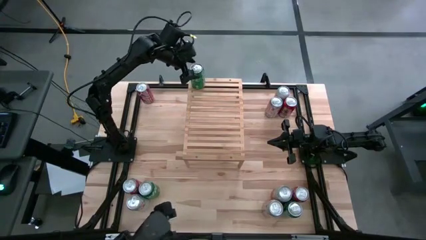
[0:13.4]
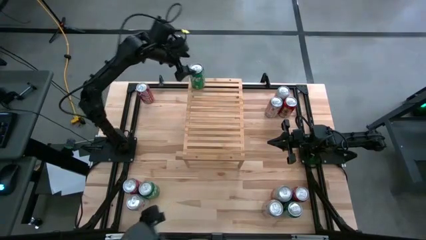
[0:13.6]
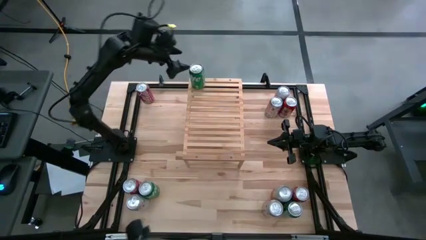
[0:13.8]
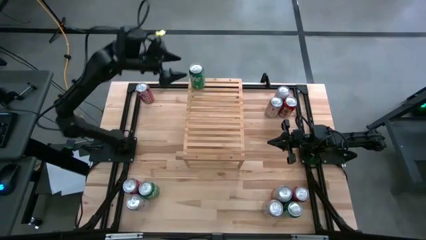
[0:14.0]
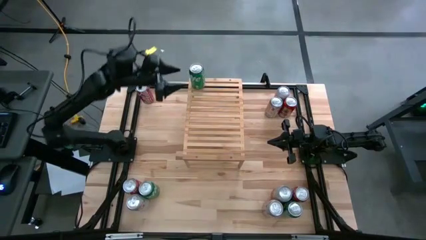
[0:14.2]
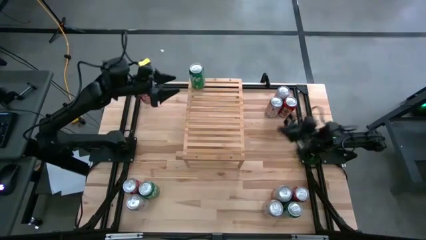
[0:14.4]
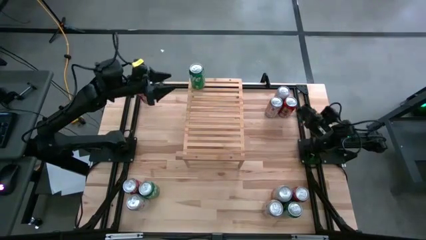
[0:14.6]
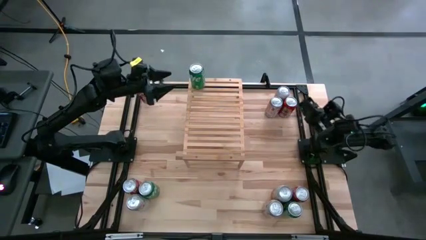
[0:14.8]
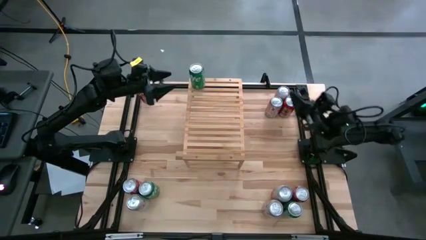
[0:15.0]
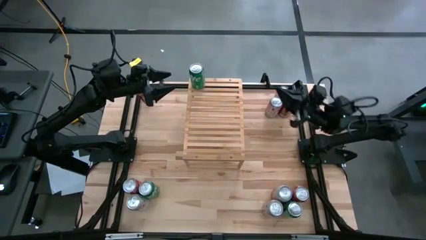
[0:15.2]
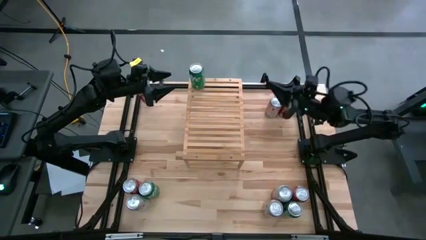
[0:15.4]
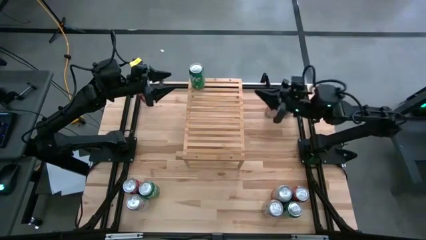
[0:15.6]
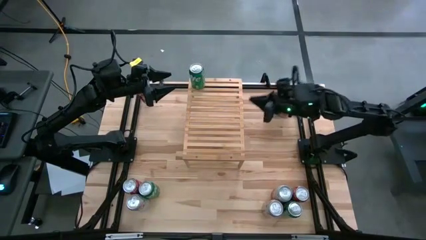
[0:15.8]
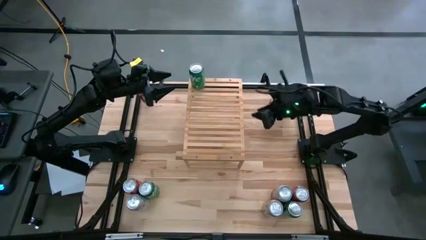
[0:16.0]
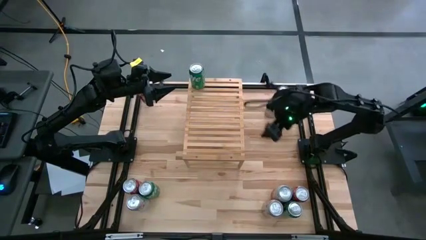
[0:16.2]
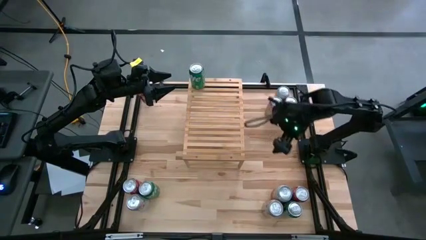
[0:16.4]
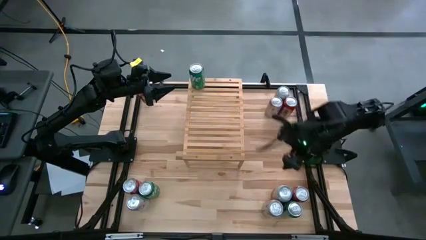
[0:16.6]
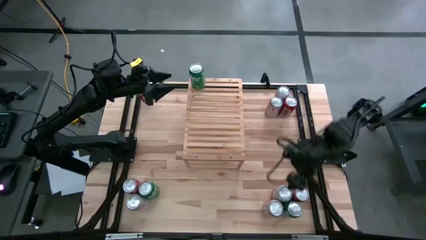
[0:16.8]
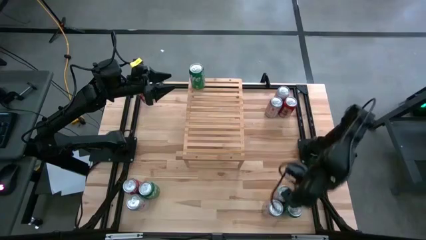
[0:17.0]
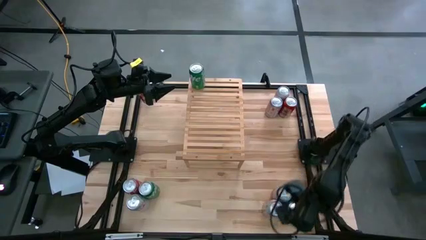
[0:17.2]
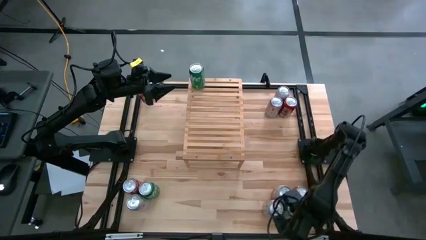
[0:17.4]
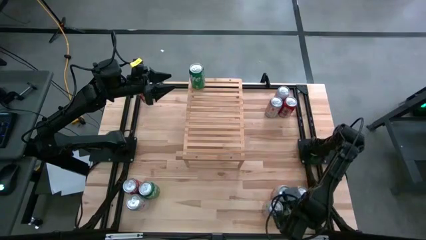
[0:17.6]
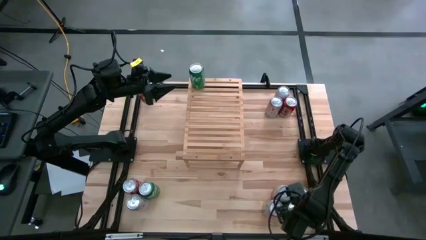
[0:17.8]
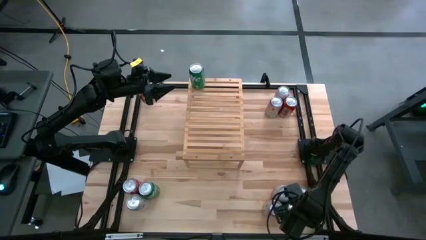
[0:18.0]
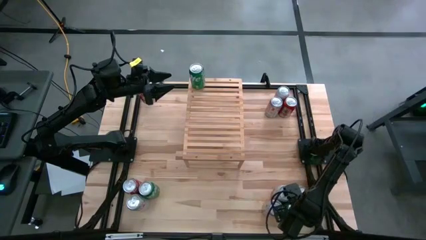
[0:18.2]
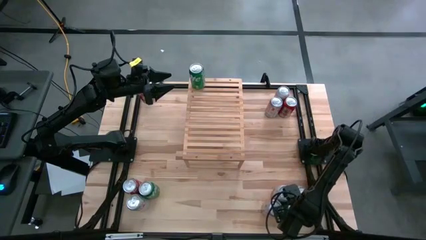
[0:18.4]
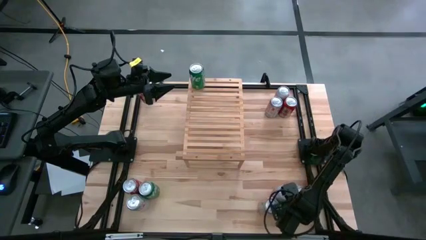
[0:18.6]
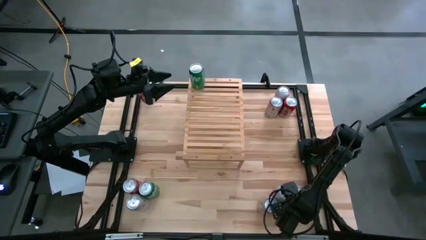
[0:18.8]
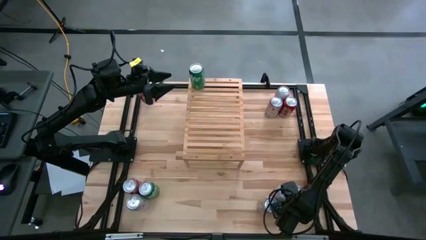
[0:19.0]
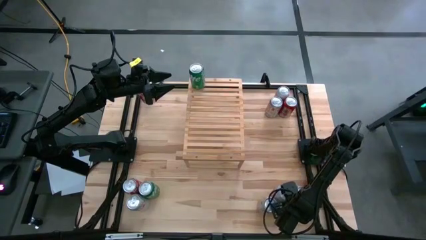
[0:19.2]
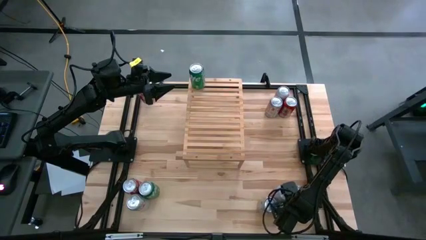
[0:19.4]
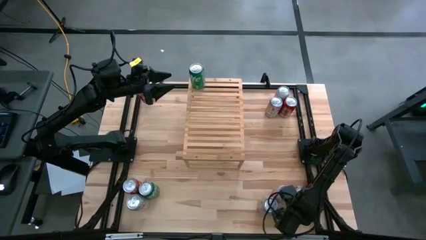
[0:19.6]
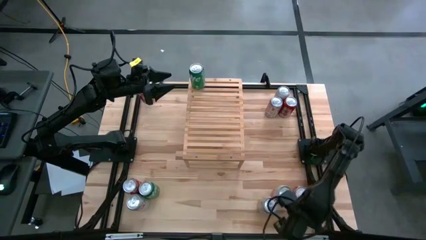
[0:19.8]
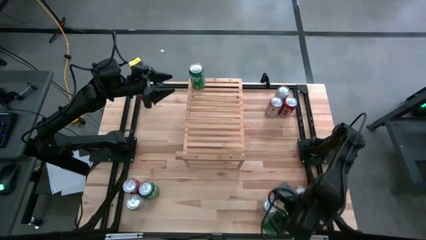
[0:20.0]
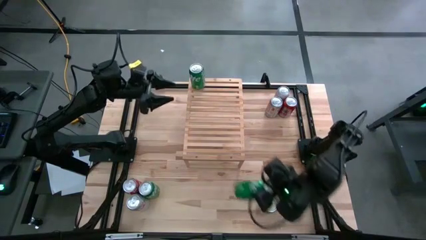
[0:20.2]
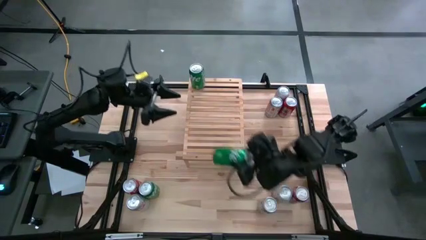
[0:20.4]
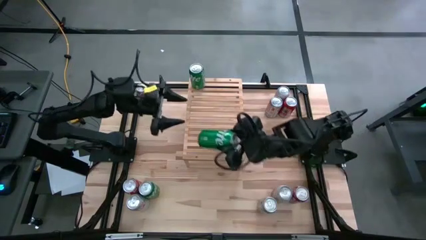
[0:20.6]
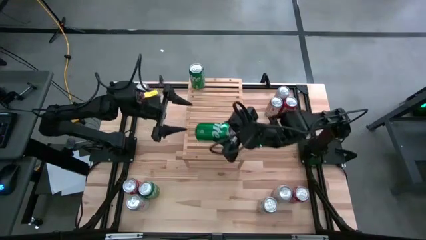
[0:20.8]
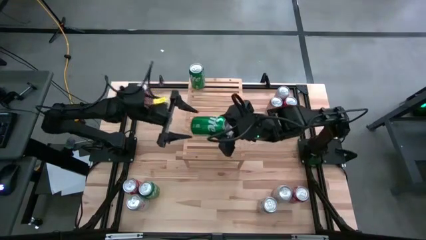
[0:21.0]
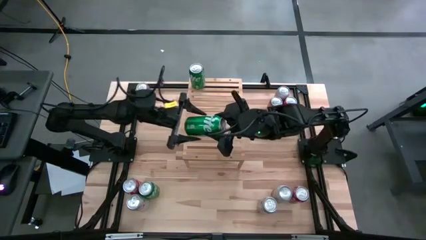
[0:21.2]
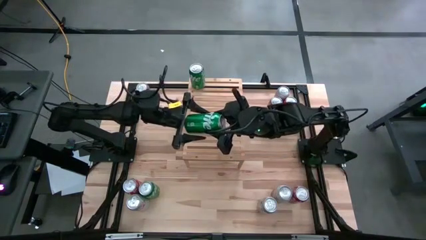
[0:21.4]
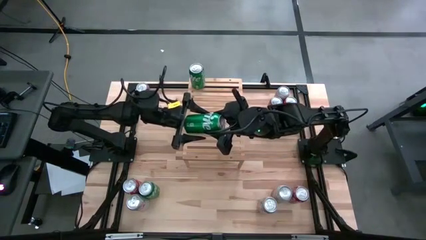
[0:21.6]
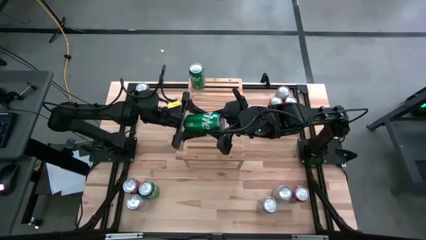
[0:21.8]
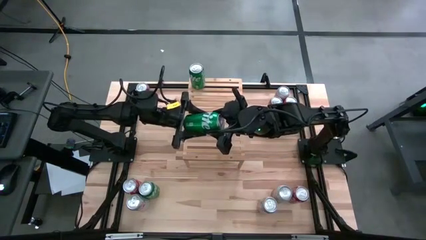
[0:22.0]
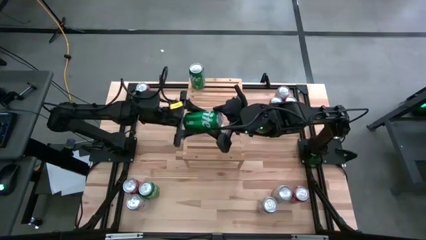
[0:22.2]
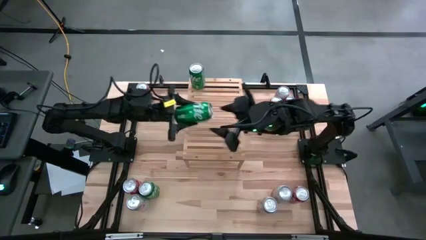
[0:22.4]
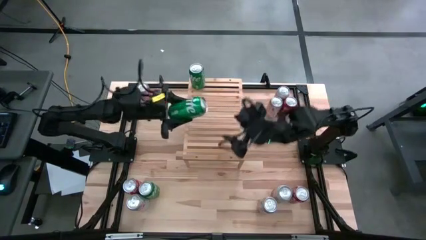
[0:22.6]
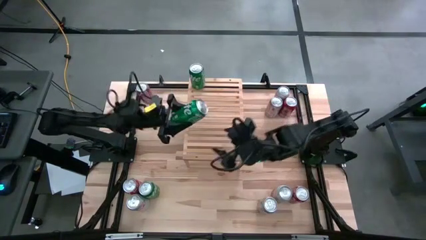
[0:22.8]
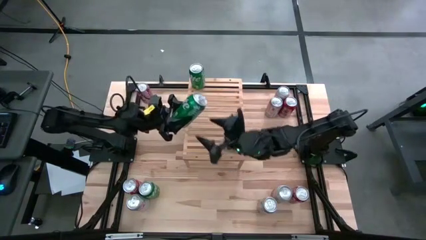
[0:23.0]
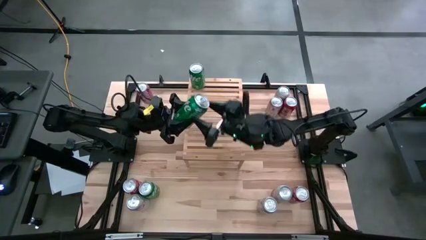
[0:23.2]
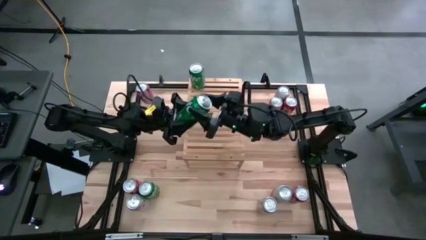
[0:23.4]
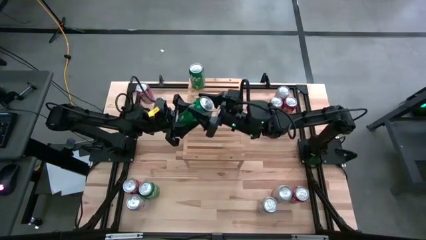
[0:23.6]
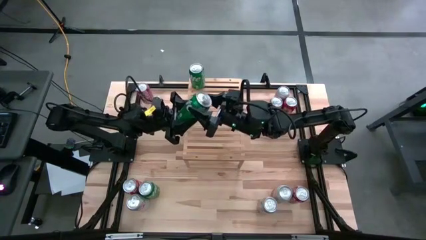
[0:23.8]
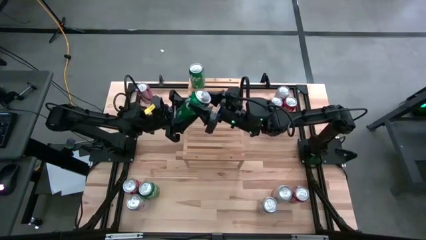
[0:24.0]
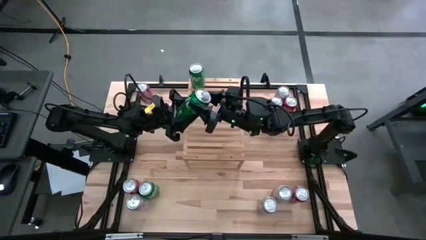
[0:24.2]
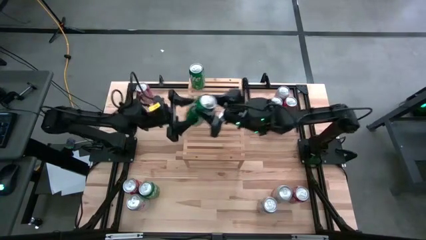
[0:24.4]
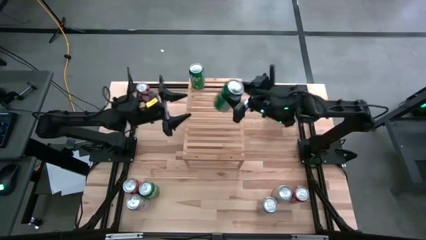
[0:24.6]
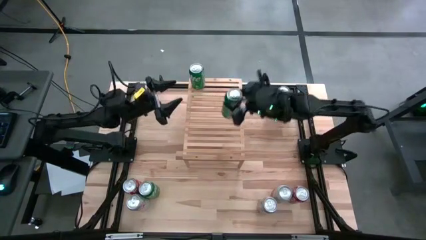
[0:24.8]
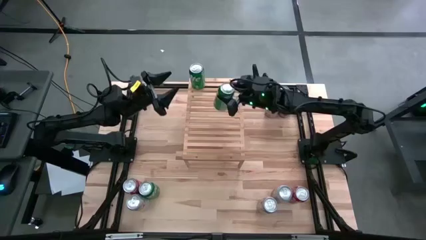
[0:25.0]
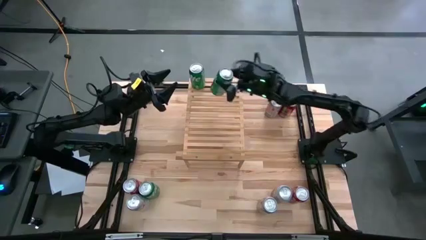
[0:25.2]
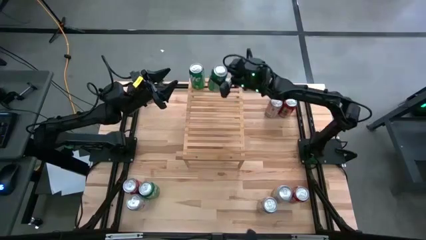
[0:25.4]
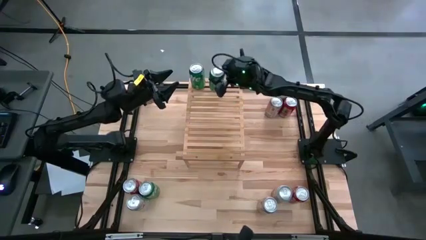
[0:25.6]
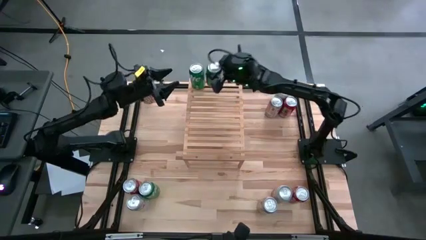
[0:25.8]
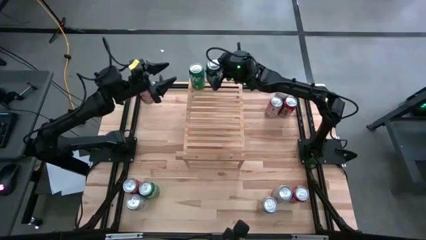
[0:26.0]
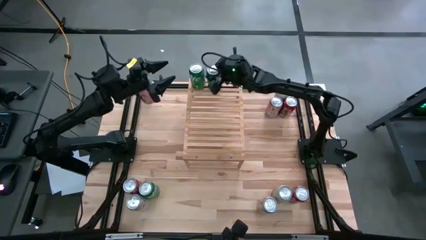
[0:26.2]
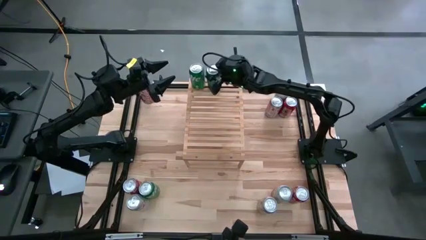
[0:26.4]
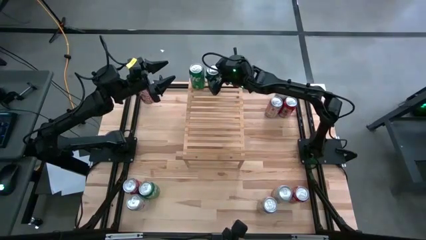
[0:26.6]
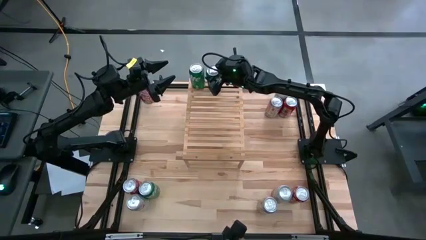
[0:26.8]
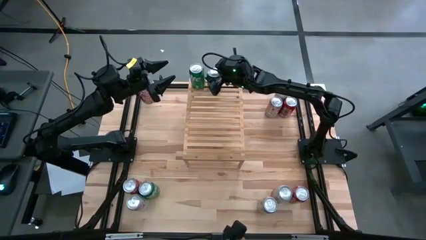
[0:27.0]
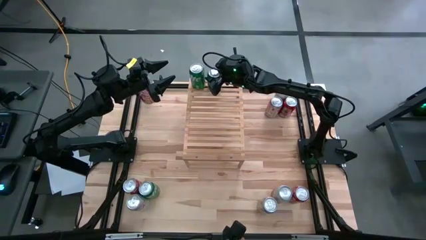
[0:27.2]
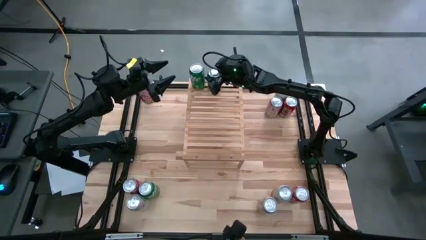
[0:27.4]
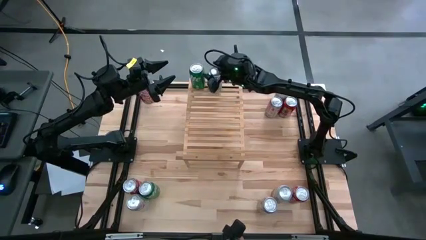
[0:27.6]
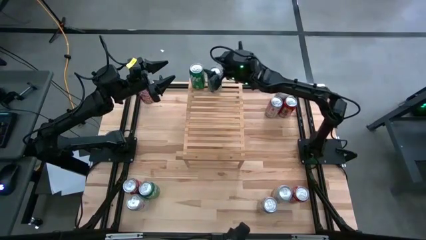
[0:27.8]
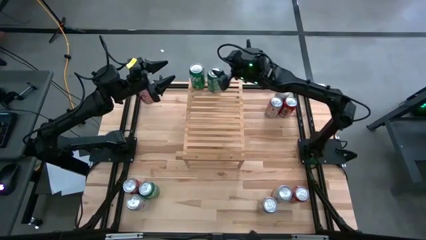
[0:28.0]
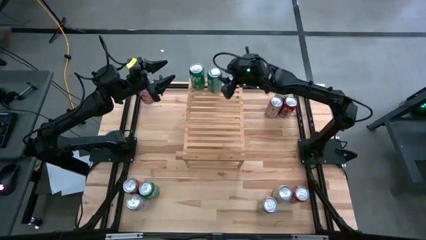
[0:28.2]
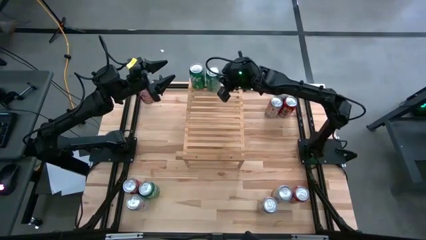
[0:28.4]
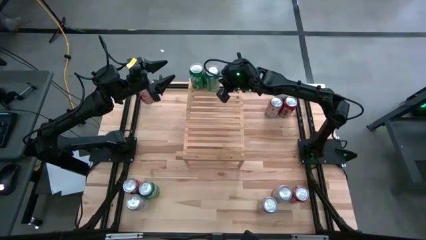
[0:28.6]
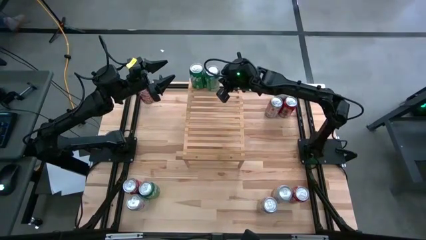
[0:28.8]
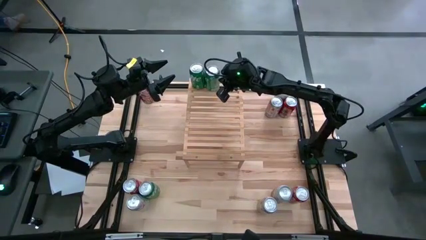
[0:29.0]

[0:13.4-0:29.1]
Task: Place canned beverage on shelf
Put the right green soda can on the shelf aligned with the other green soda can
